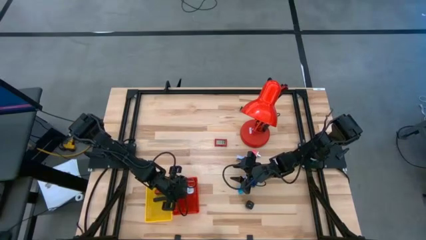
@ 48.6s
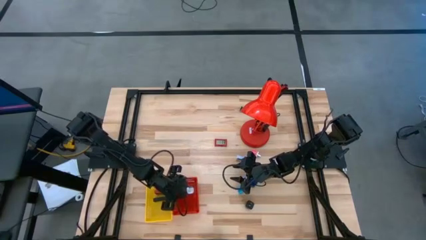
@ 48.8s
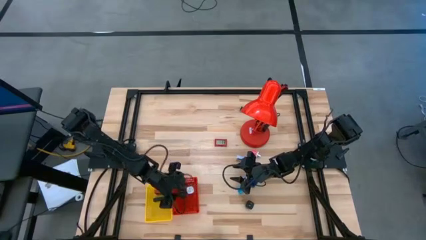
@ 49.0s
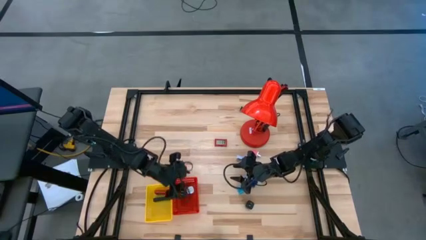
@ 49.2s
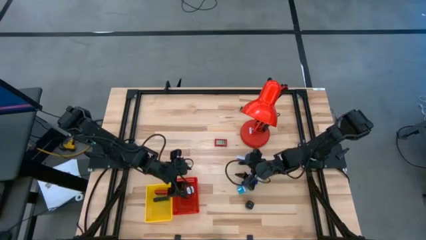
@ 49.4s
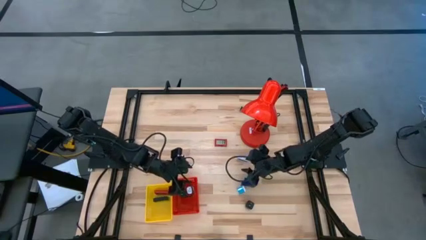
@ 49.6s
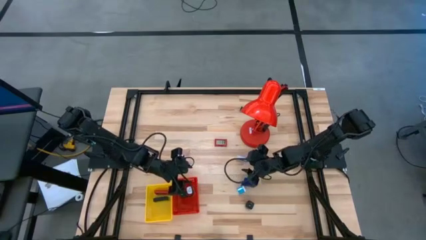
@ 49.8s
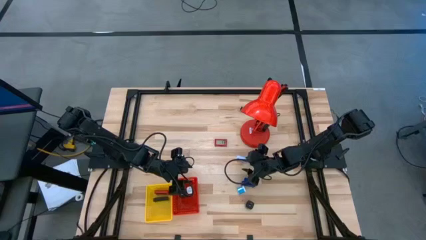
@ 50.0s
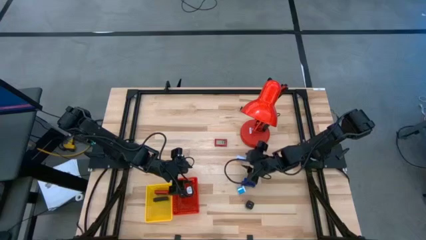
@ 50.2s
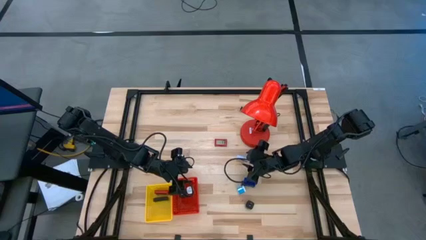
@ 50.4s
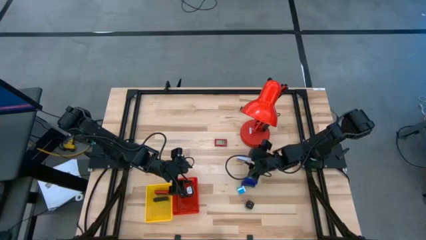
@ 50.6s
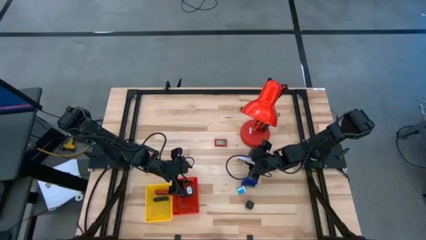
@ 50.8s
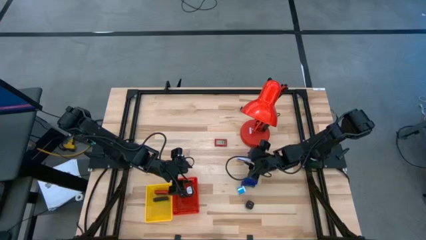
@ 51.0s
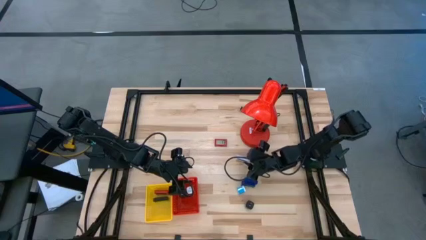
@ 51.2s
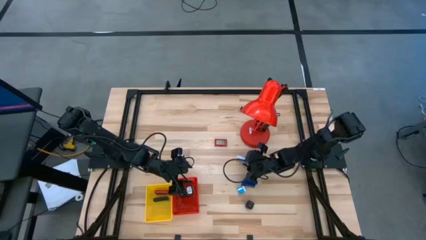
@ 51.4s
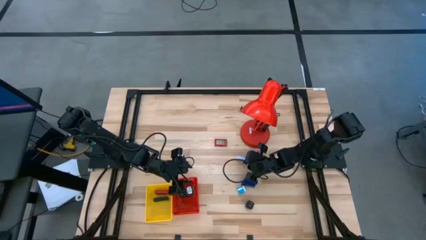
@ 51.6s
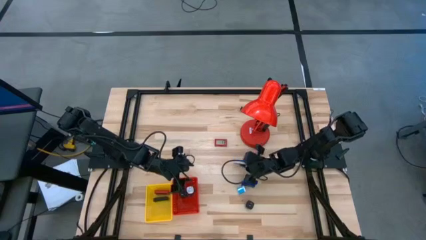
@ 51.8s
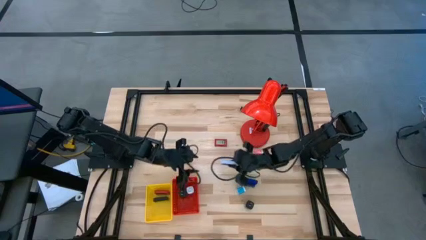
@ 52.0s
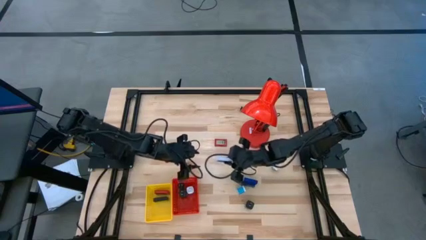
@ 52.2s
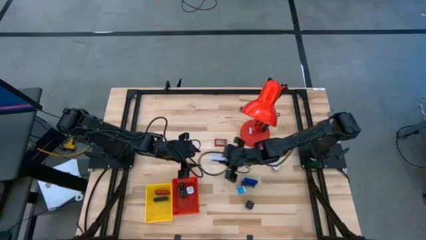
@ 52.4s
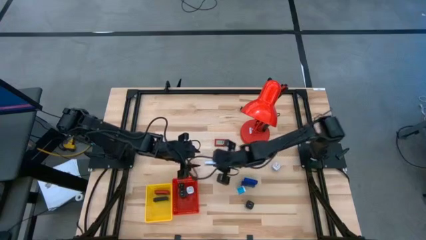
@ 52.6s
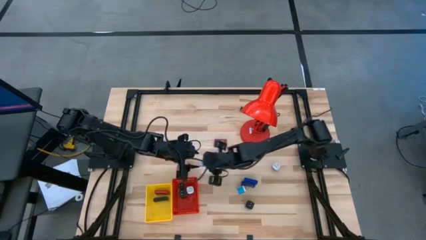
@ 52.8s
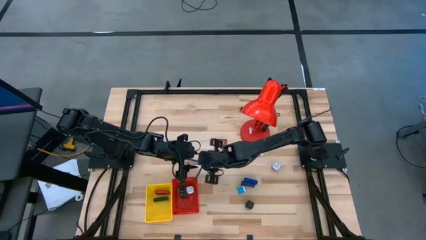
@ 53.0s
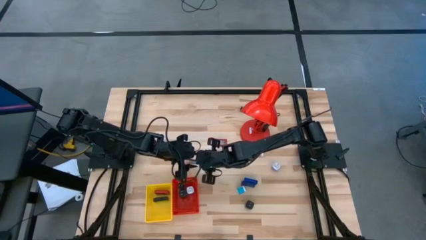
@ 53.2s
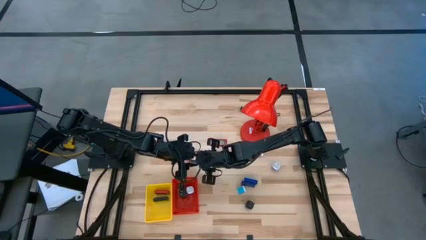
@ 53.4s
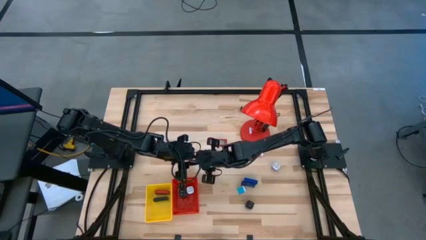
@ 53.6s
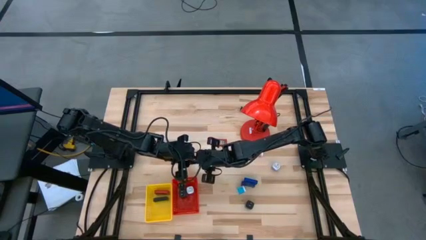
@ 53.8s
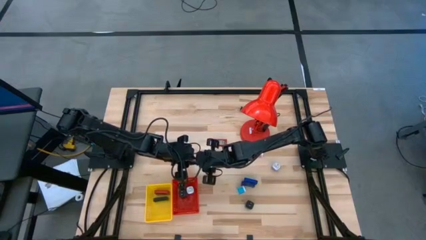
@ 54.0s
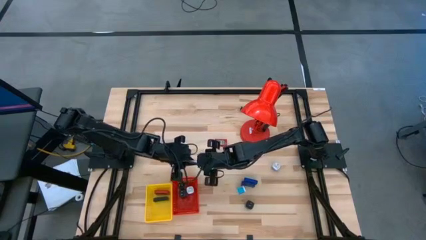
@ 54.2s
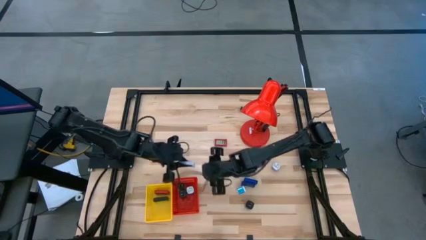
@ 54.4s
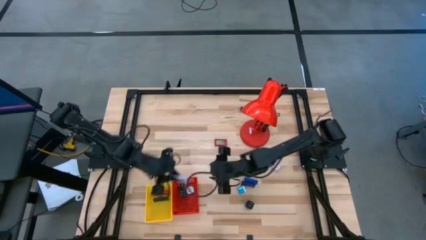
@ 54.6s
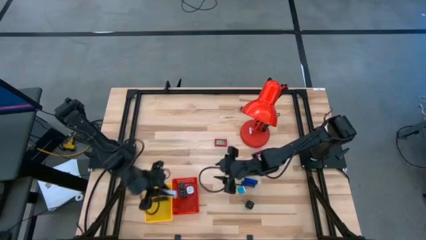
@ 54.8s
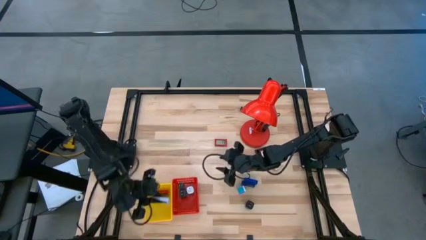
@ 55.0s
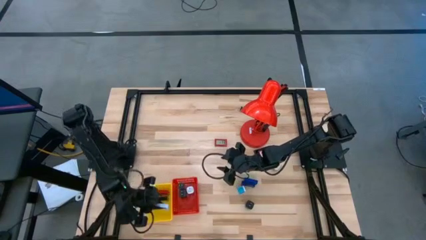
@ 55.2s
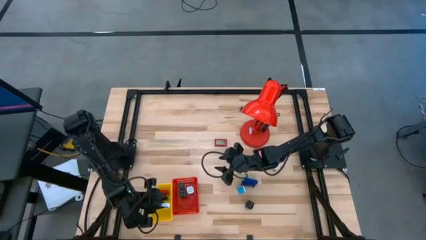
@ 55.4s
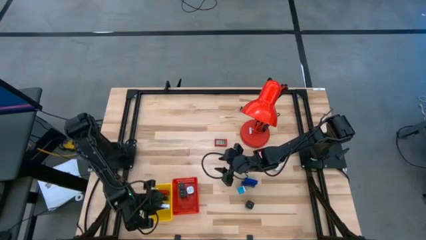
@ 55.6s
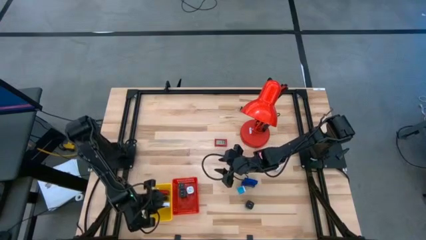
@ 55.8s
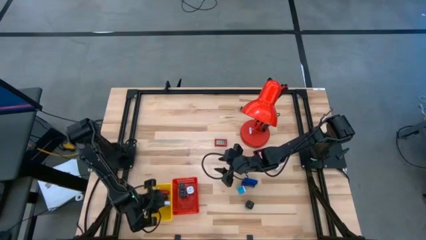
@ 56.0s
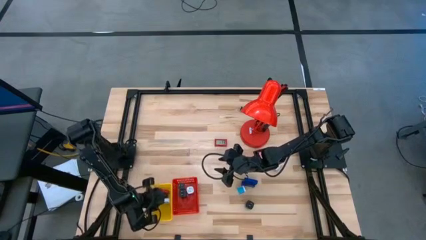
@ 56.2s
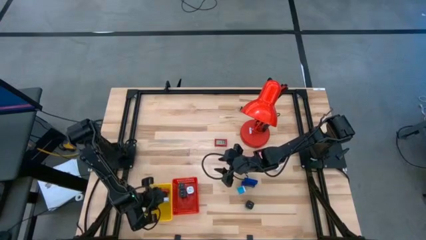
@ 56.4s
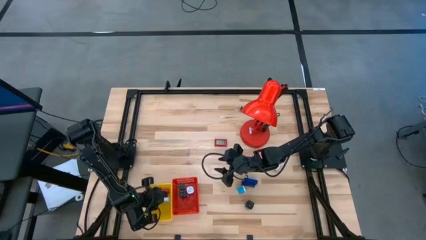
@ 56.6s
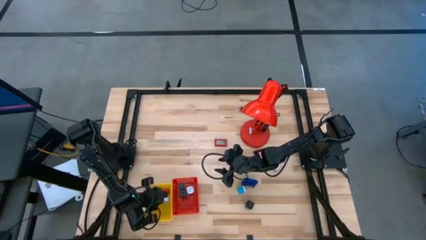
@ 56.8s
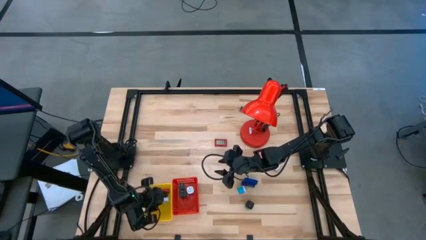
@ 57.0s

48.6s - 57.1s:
Task: Pick & Place Office items
Put the white digital clock into the yellow bin

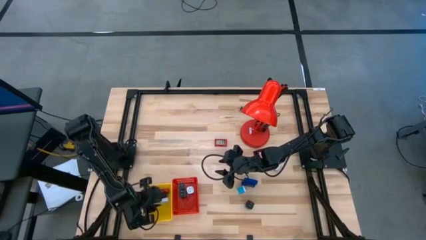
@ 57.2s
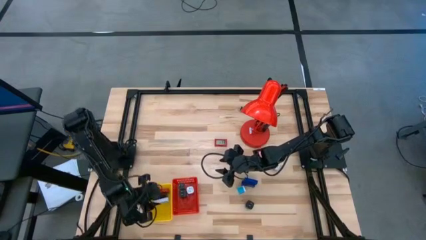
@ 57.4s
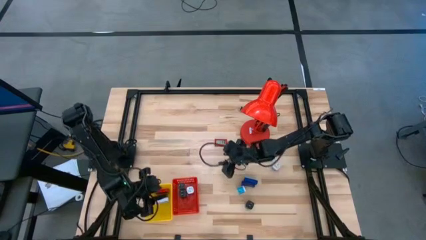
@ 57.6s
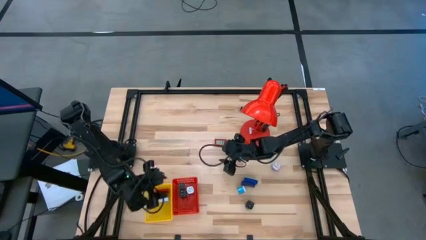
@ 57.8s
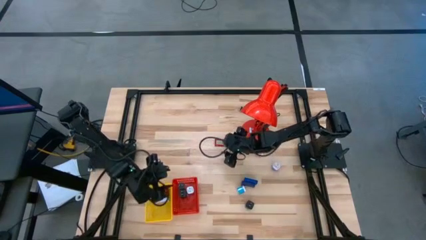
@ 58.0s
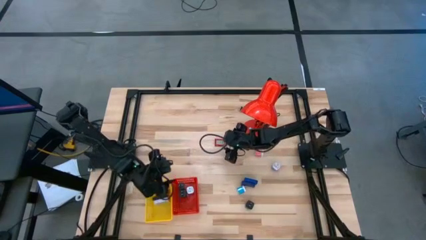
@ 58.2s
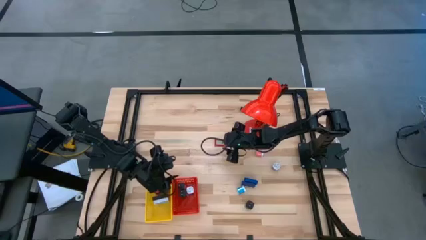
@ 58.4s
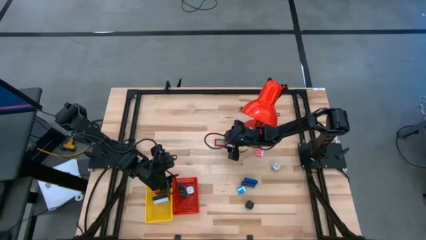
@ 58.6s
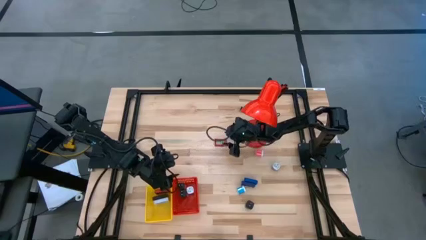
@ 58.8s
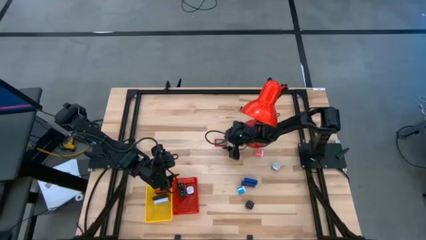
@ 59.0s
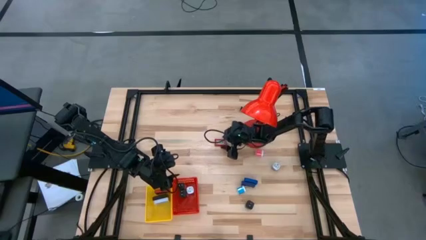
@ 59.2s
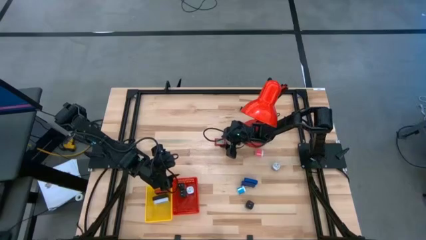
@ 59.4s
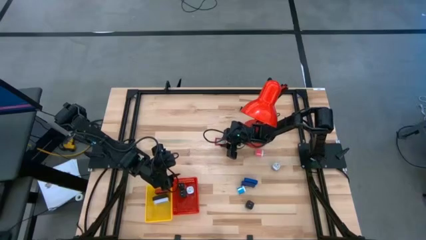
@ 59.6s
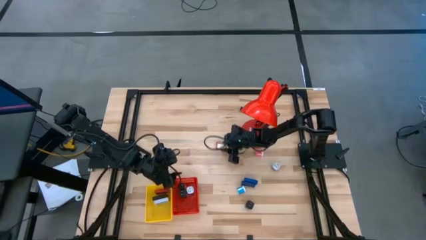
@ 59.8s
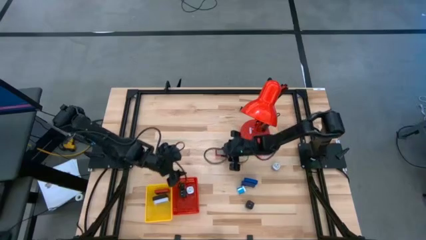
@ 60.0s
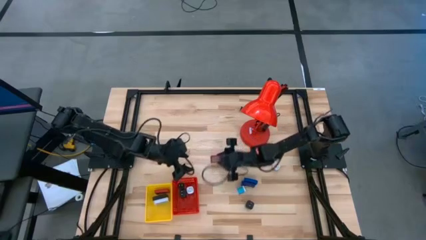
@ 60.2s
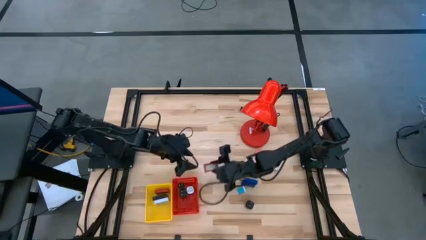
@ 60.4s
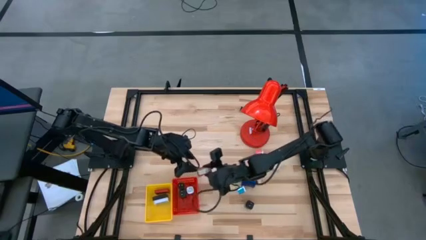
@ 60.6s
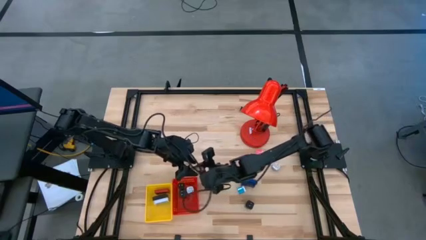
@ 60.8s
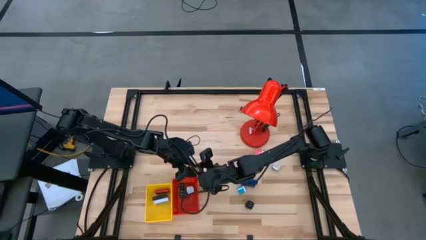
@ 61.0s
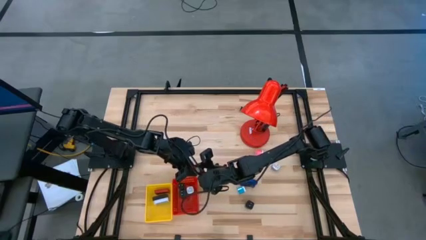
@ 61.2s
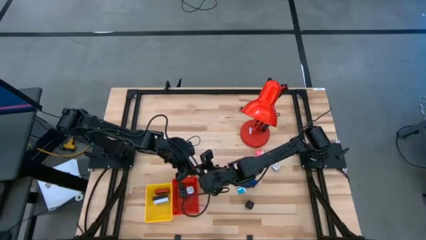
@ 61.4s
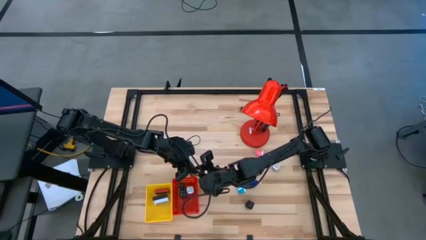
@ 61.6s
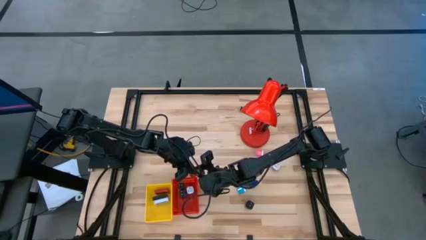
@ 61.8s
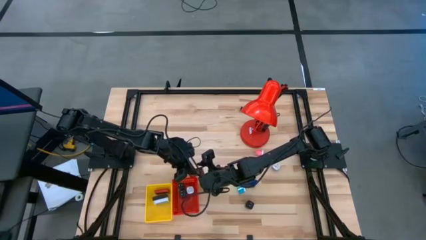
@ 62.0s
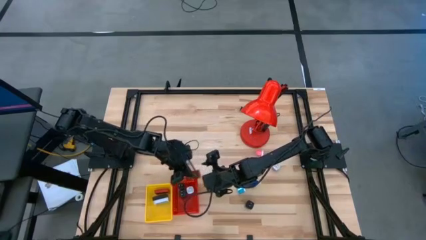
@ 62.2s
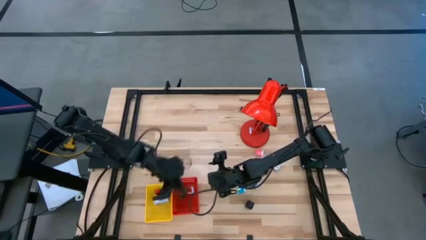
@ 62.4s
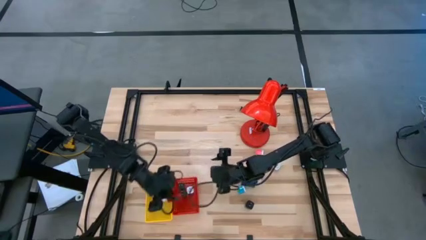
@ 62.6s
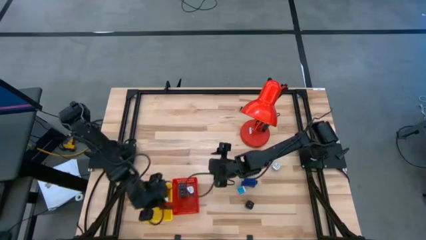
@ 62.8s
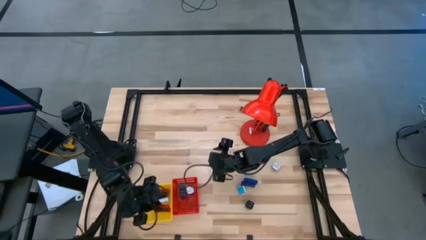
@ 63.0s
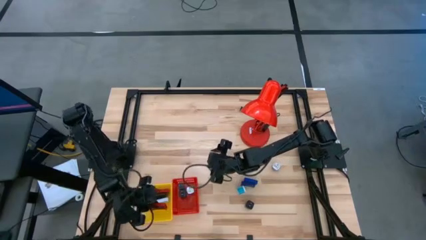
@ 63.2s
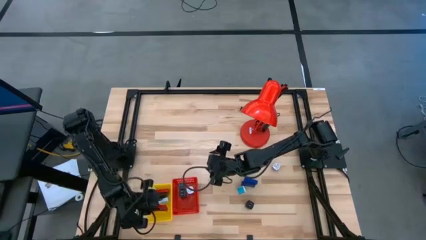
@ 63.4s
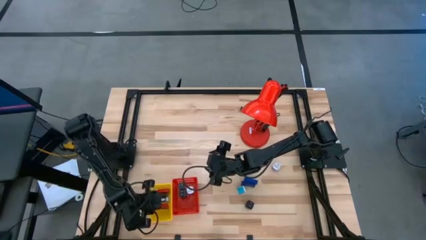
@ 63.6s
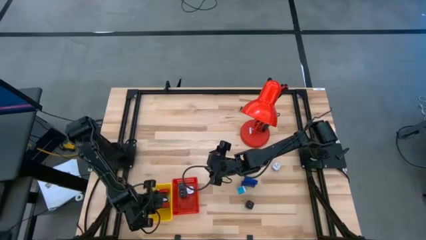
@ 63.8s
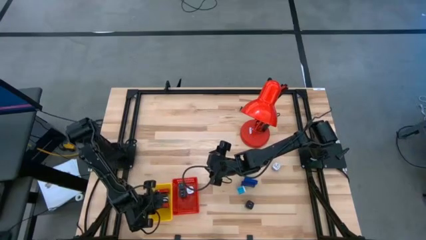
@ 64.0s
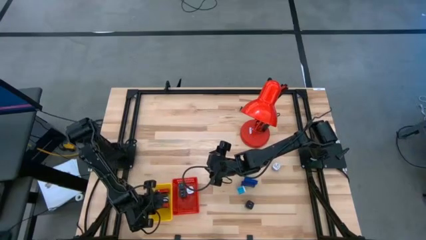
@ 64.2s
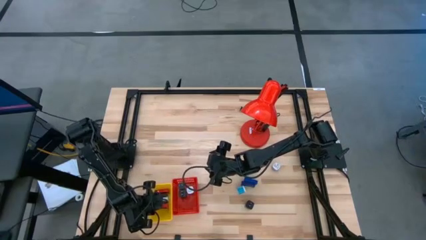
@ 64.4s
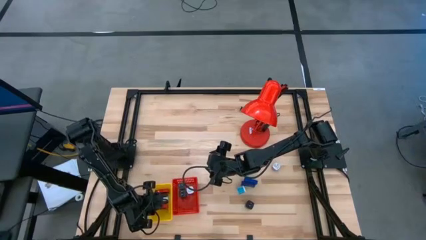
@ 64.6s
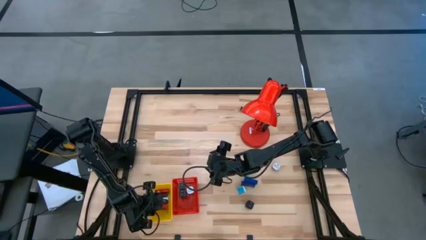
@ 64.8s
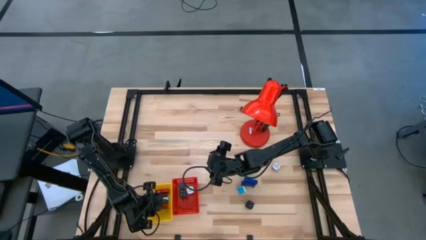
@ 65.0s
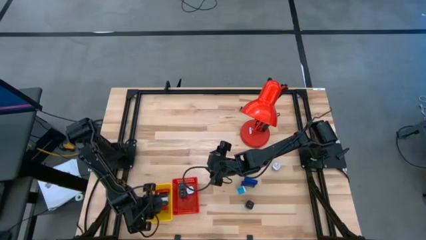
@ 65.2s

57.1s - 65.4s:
Put the red digital clock into the yellow bin
